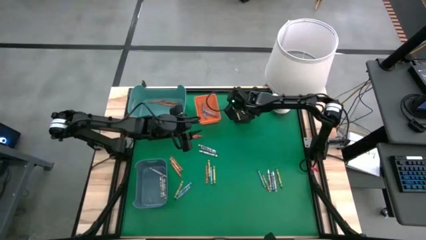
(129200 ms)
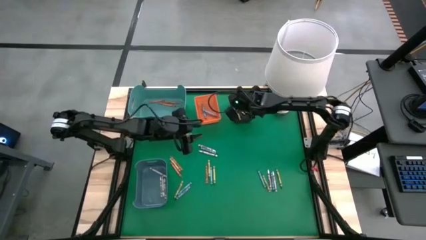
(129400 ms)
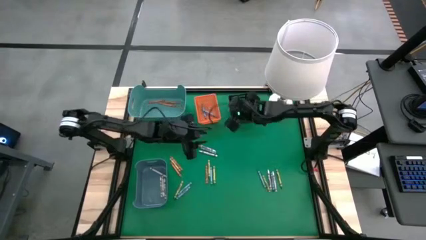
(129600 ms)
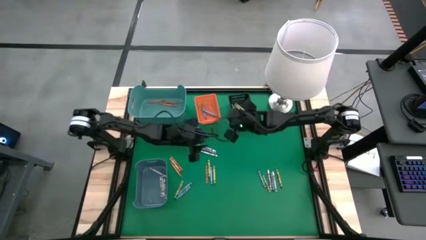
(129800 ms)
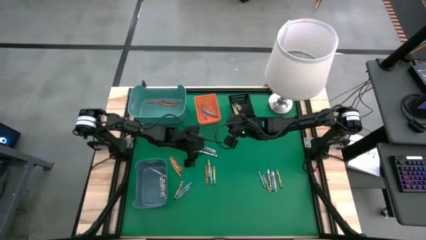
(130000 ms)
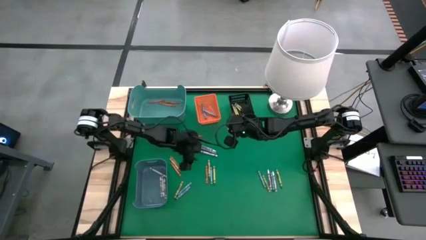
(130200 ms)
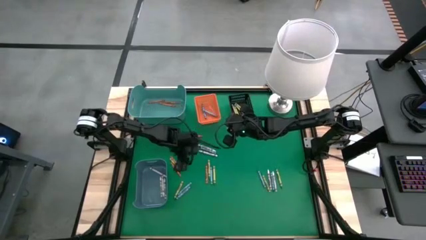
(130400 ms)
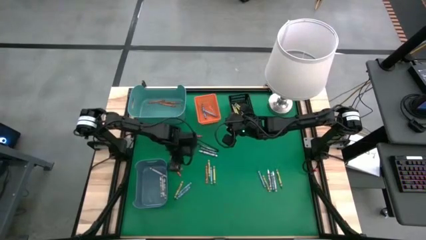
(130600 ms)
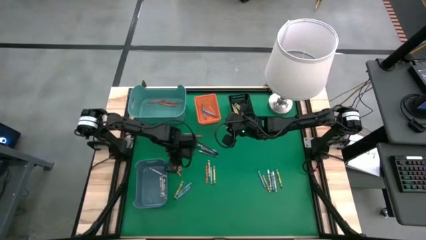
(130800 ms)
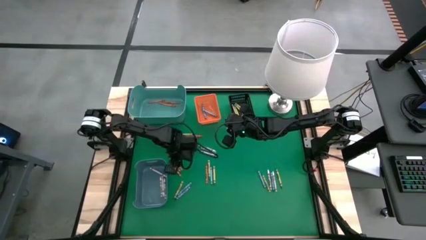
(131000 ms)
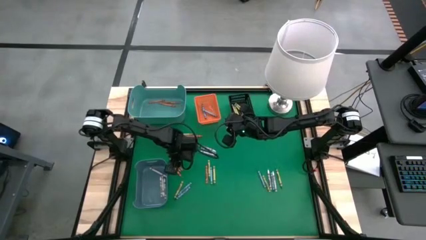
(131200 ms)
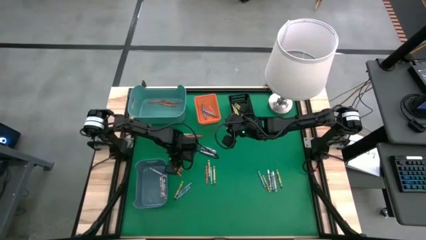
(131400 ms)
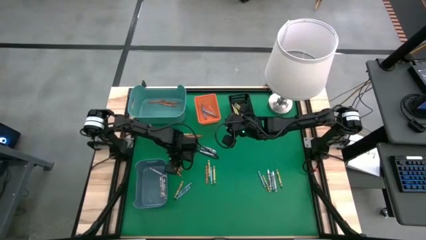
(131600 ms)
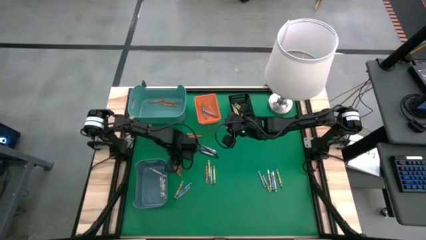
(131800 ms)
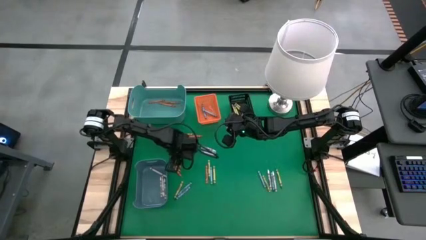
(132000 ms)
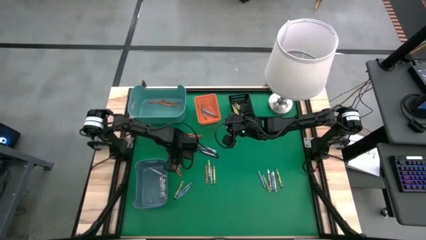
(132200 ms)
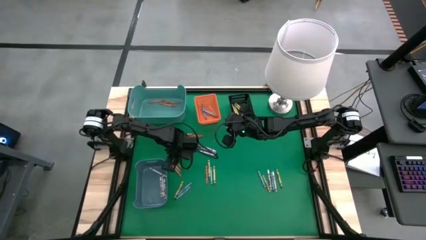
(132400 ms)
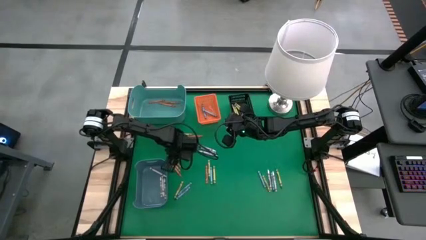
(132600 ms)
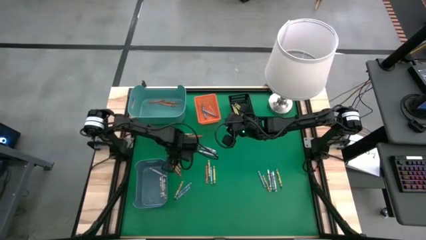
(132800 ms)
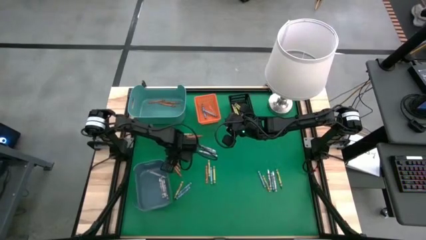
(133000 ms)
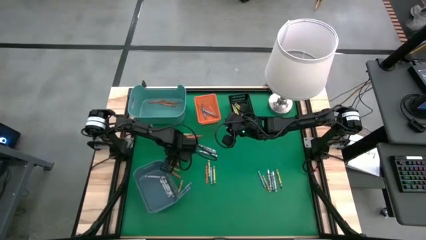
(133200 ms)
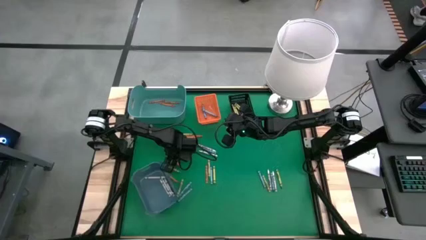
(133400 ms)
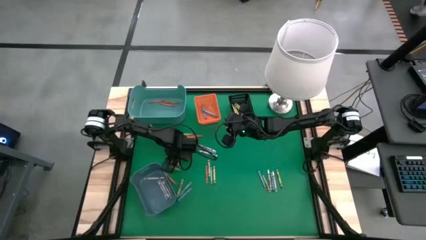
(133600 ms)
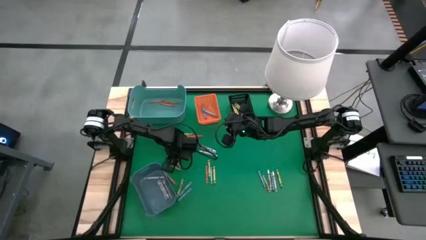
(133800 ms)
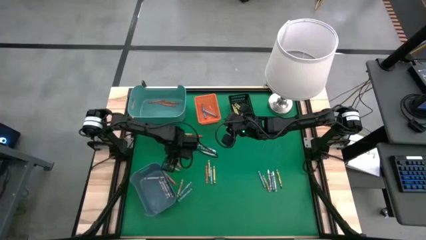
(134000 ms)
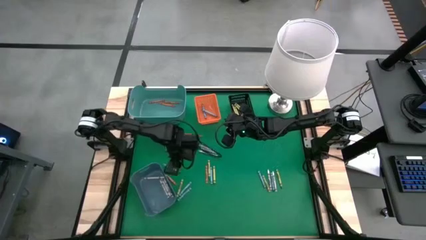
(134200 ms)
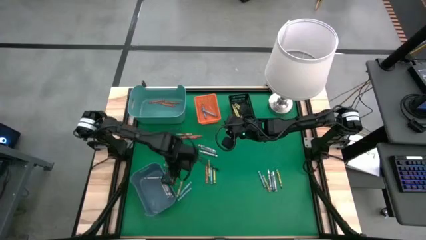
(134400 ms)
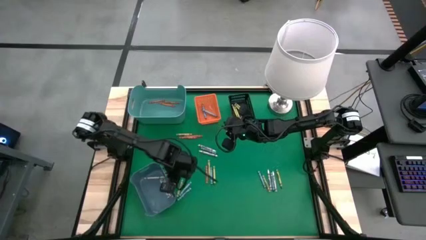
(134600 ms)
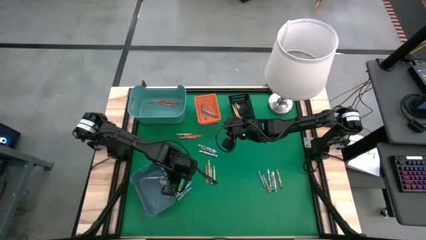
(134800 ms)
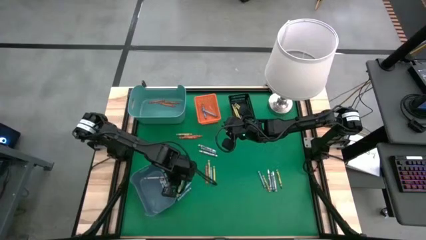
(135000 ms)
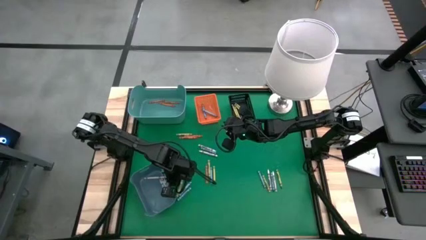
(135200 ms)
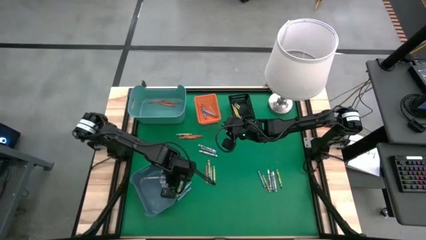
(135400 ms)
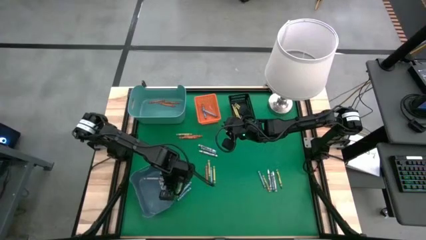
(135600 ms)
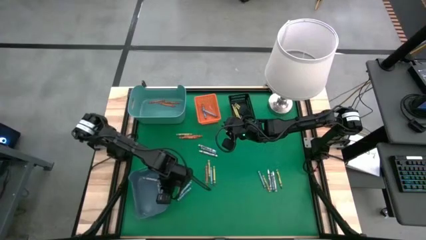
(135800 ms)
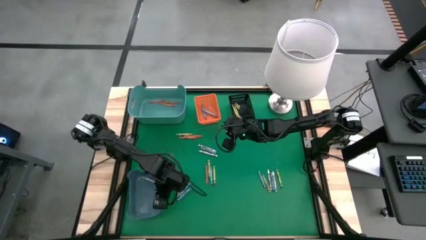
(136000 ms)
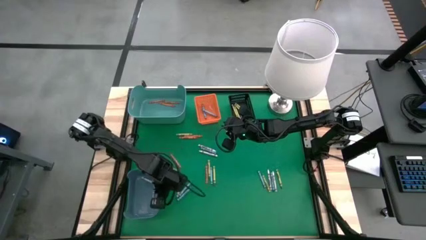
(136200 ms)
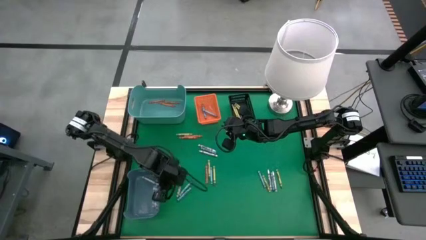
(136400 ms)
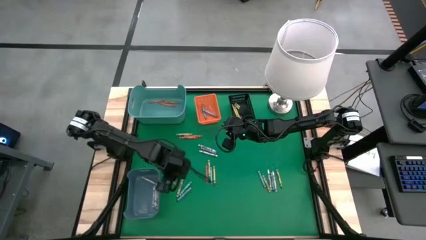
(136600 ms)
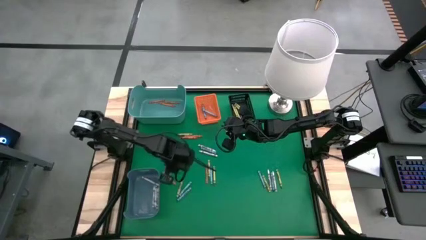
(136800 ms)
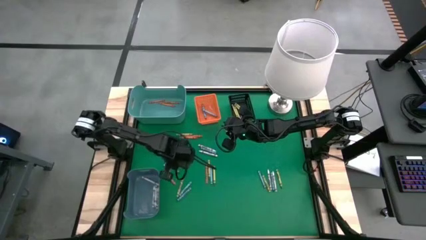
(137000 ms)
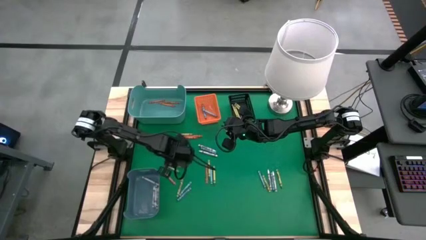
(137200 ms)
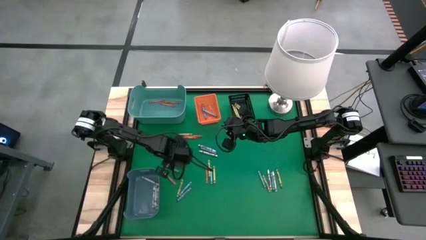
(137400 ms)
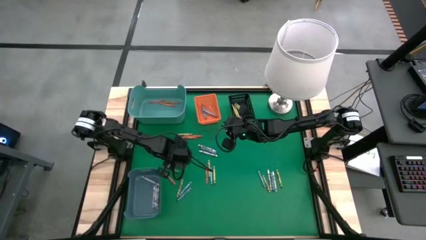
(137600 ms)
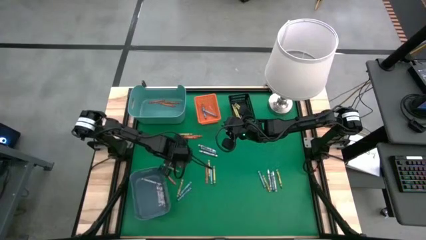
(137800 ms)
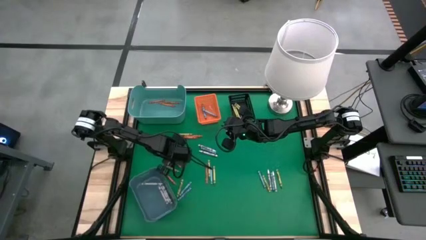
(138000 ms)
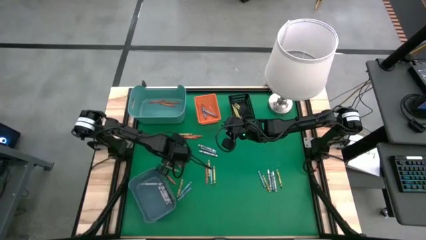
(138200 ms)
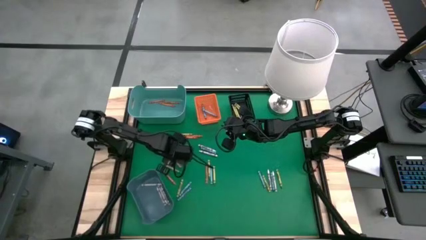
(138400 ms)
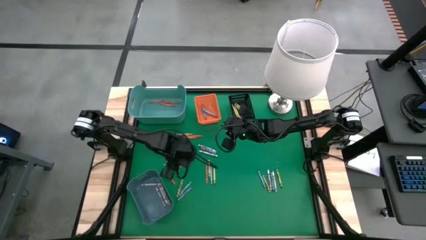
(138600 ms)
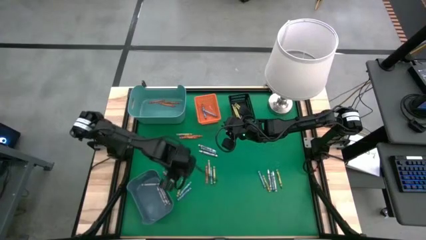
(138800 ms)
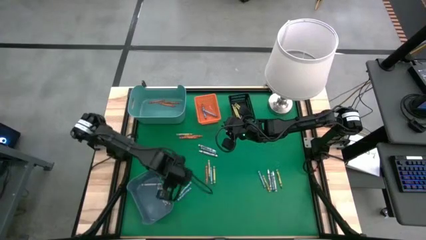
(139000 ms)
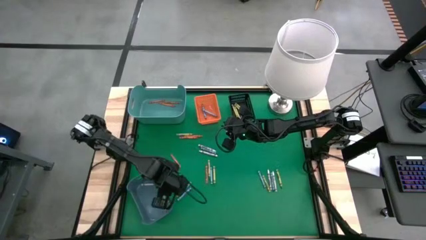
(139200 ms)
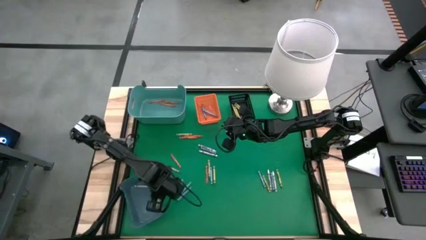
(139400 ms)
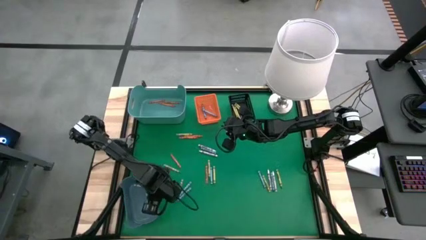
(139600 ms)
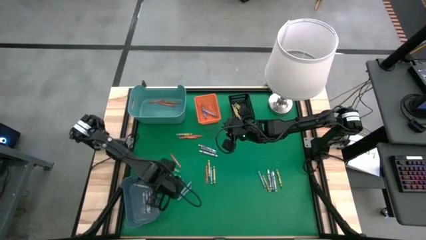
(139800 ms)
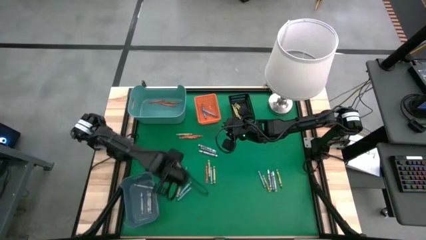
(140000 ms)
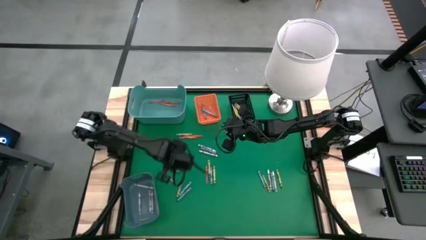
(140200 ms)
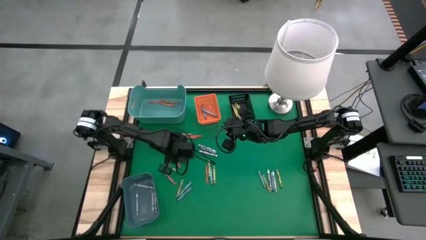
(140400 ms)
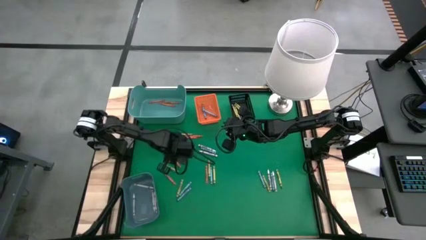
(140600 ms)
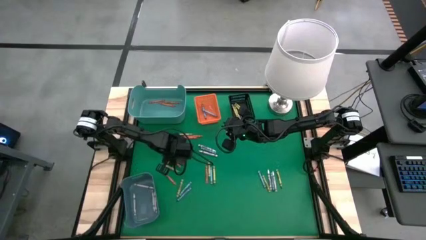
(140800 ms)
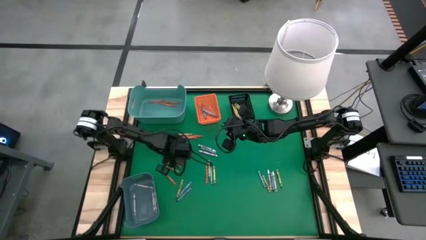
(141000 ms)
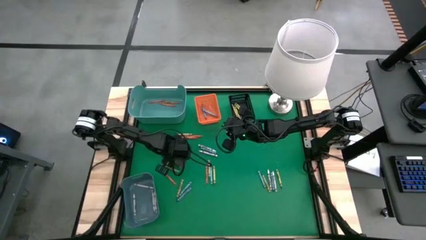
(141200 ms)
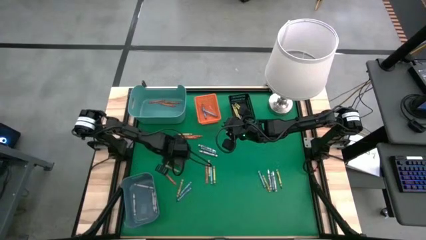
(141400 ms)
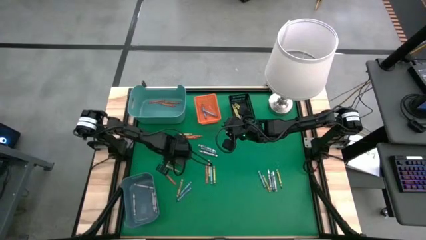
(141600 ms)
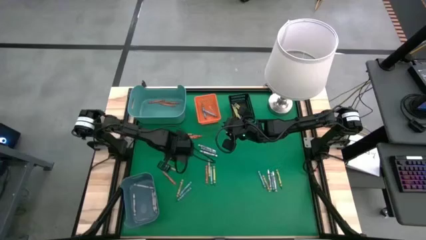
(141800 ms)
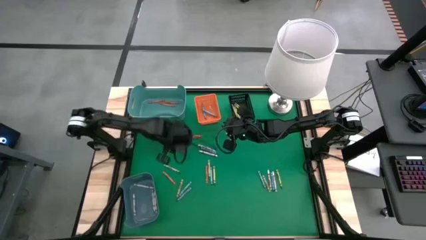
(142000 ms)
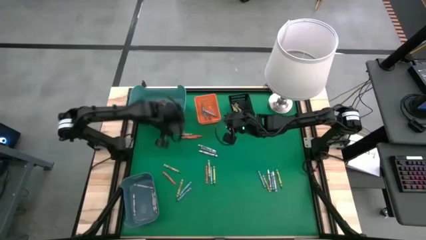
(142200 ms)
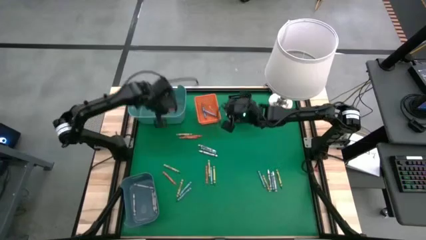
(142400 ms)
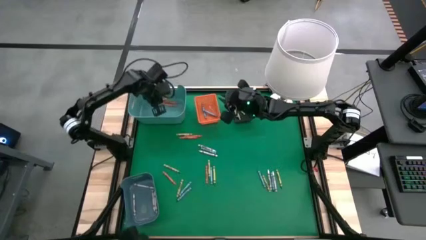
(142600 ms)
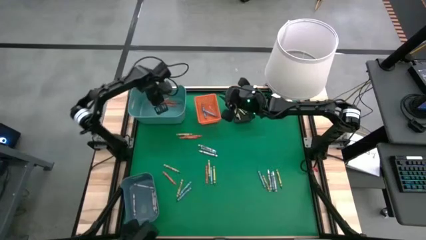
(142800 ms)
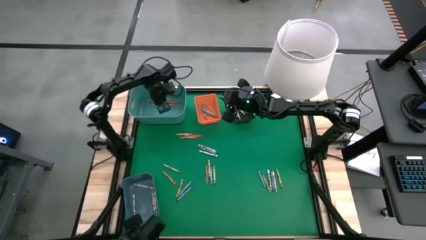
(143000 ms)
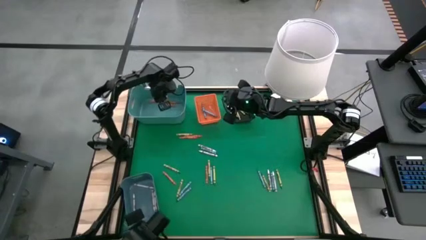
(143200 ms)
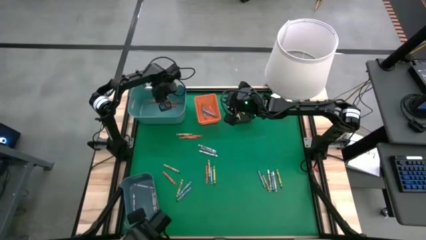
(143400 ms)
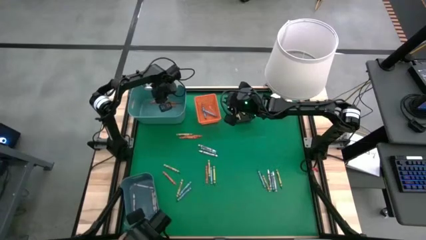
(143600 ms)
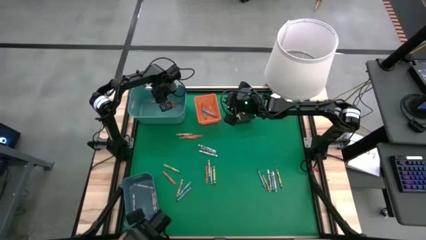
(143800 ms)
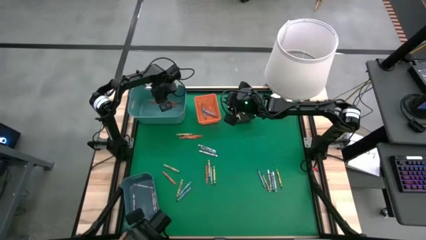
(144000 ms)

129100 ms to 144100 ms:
Task: Sort crayons
Put the orange crayon into the green bin
